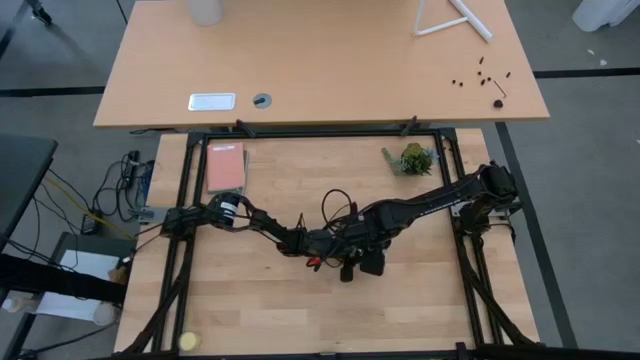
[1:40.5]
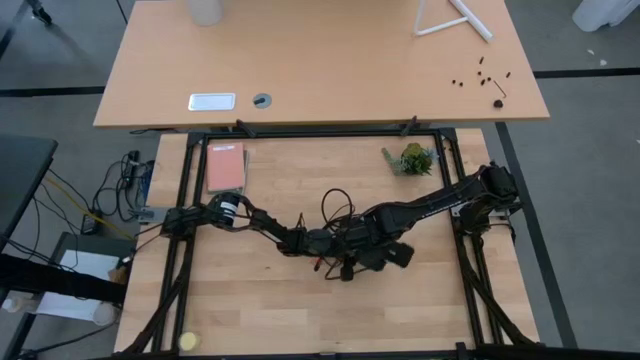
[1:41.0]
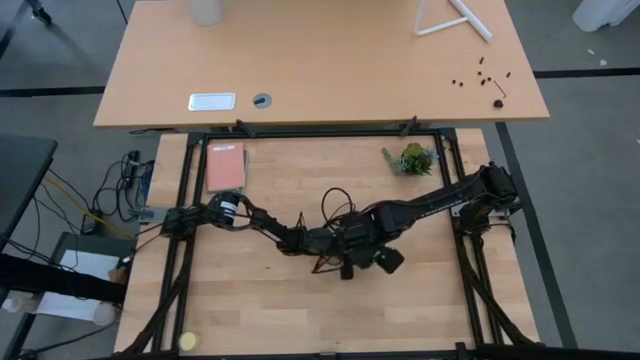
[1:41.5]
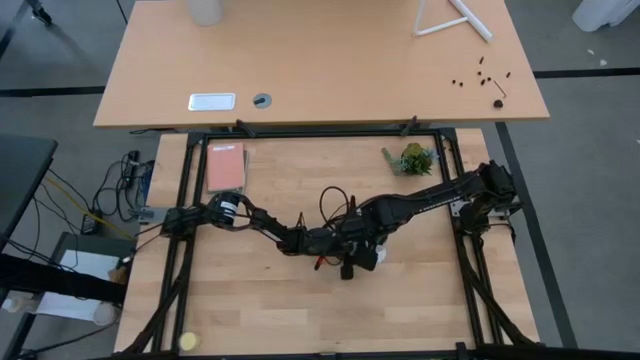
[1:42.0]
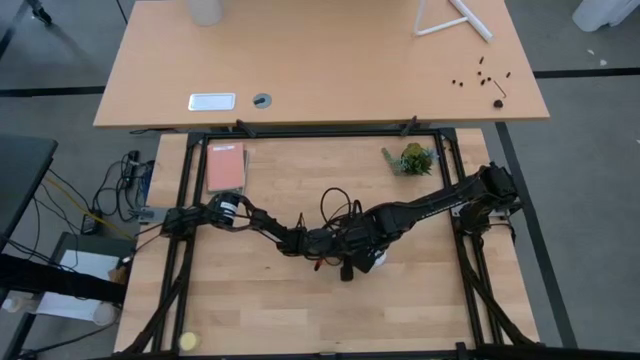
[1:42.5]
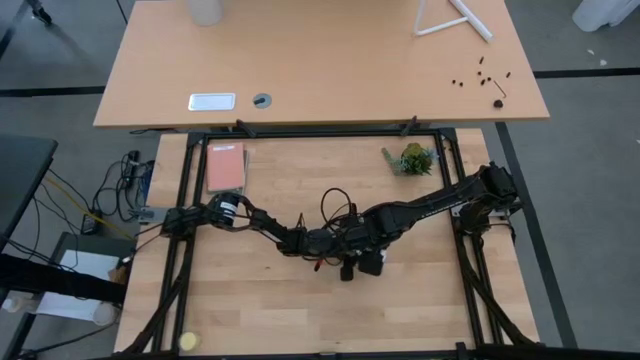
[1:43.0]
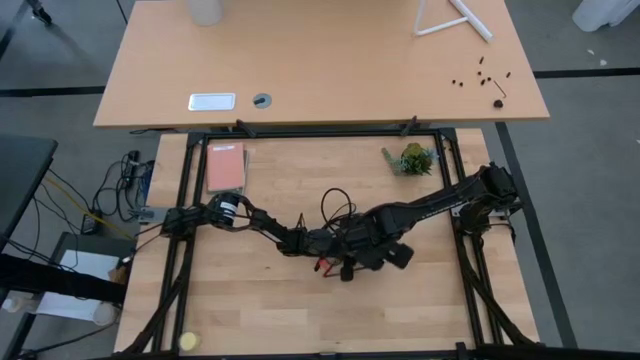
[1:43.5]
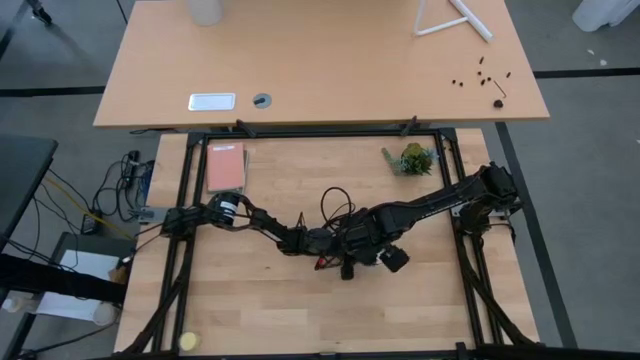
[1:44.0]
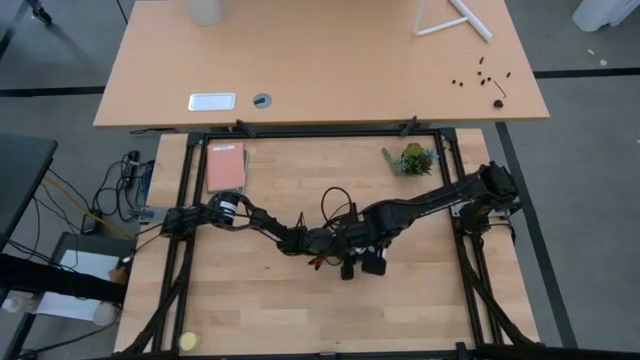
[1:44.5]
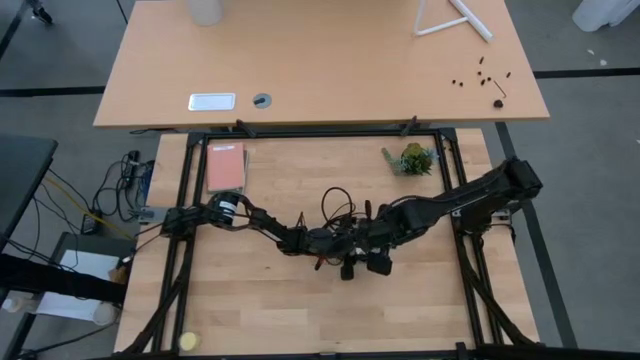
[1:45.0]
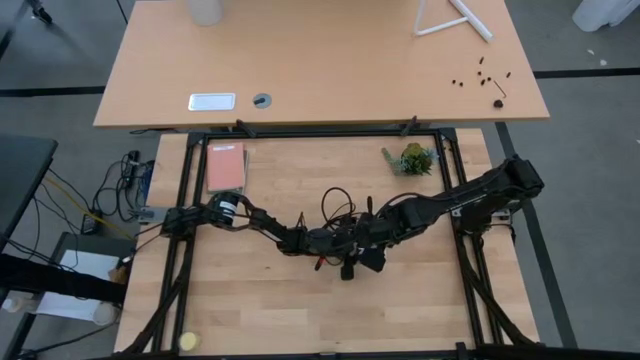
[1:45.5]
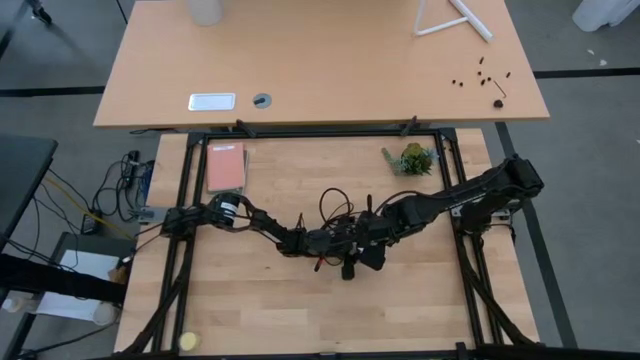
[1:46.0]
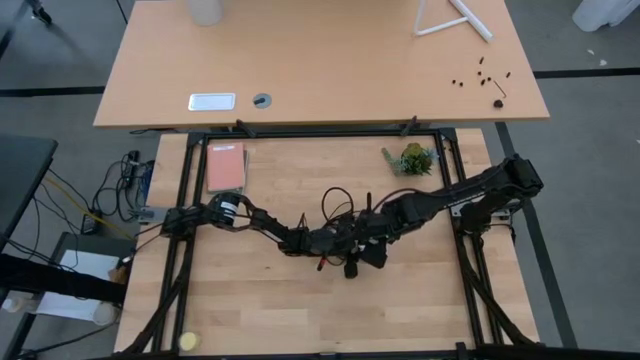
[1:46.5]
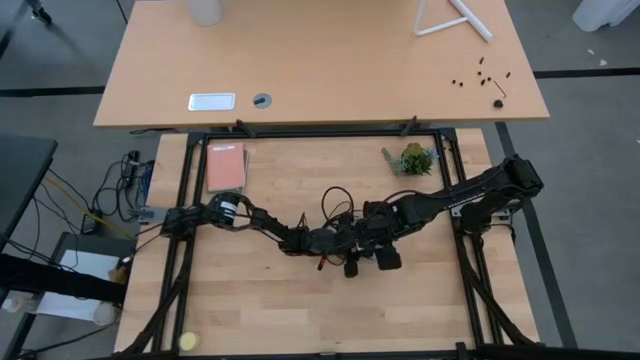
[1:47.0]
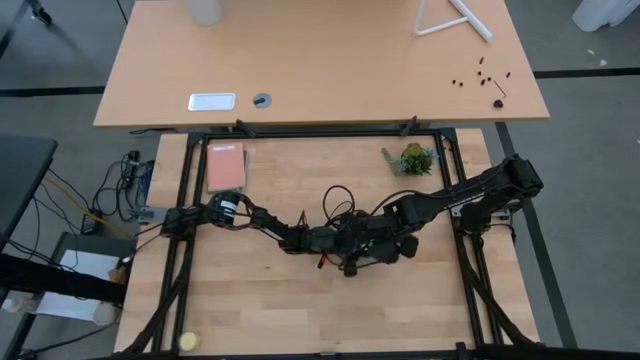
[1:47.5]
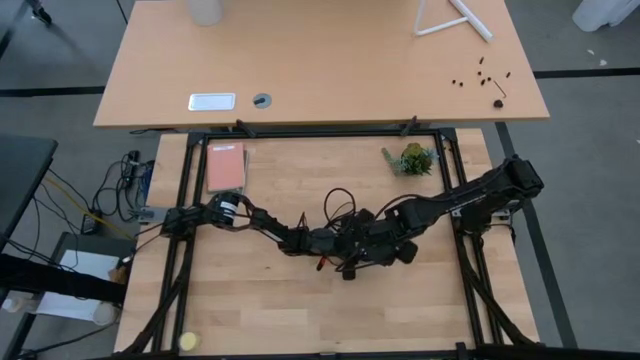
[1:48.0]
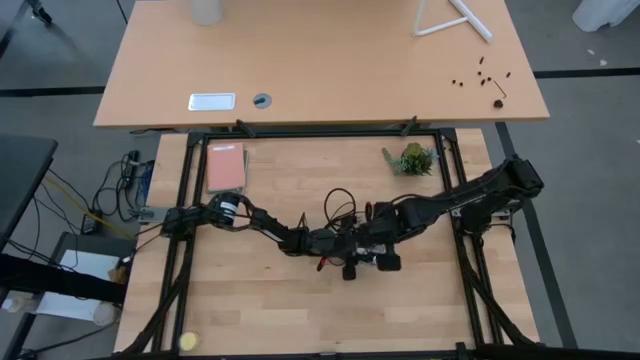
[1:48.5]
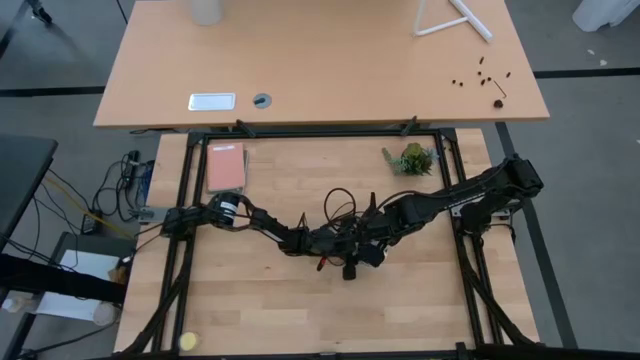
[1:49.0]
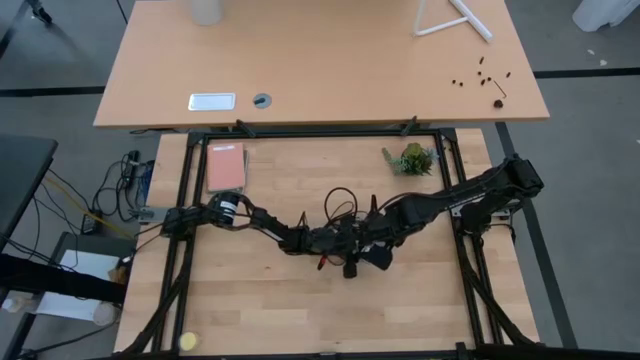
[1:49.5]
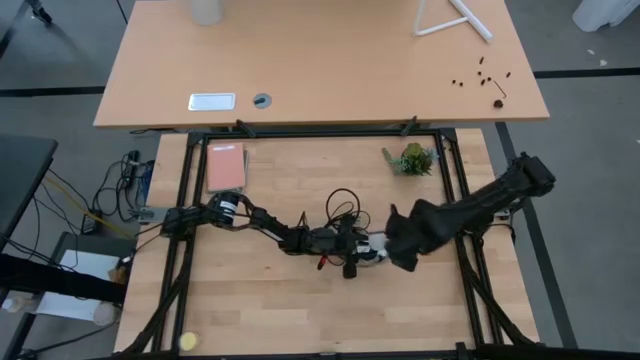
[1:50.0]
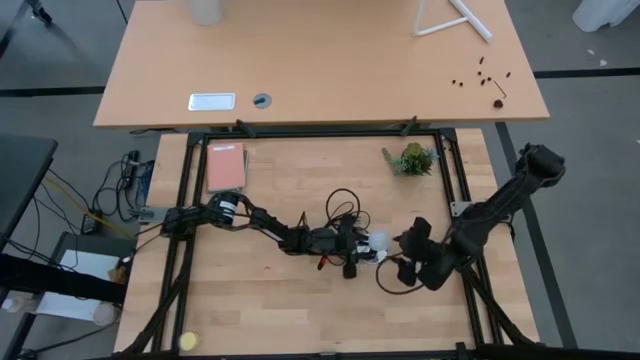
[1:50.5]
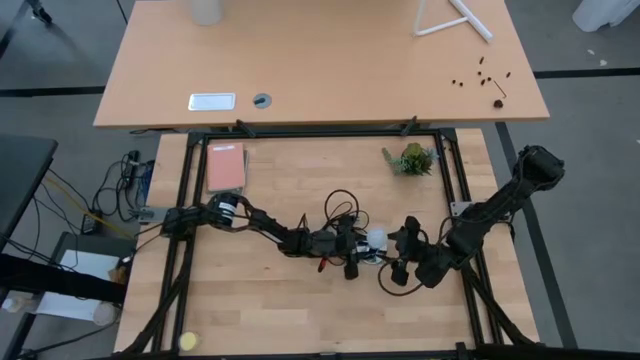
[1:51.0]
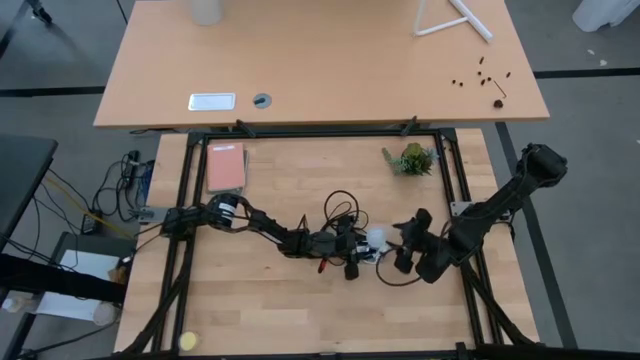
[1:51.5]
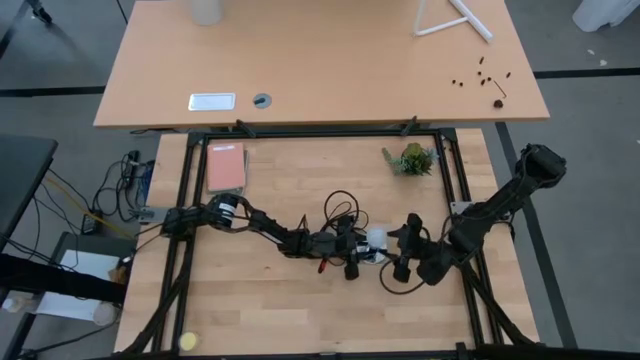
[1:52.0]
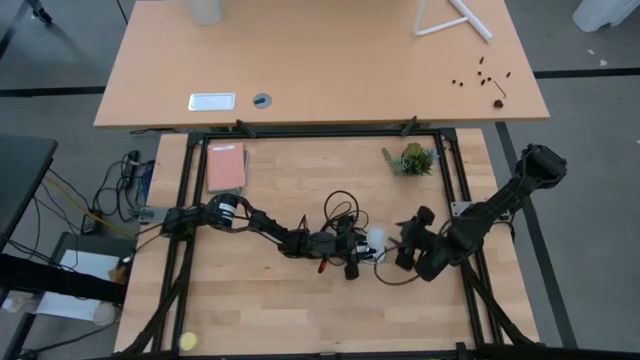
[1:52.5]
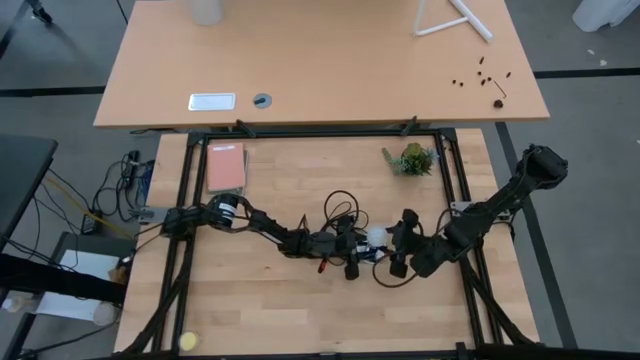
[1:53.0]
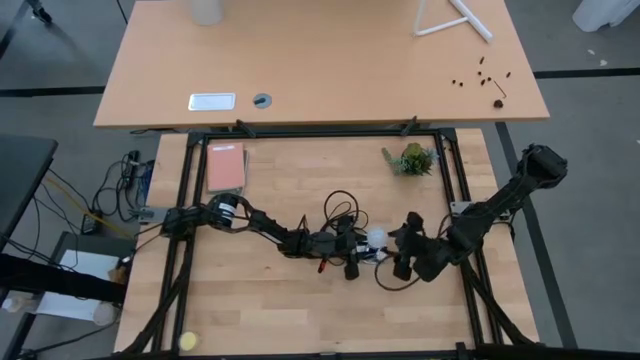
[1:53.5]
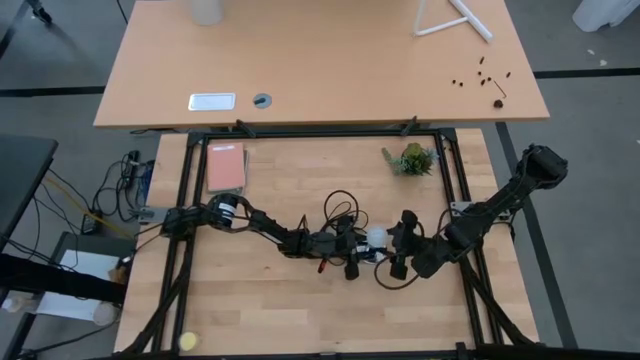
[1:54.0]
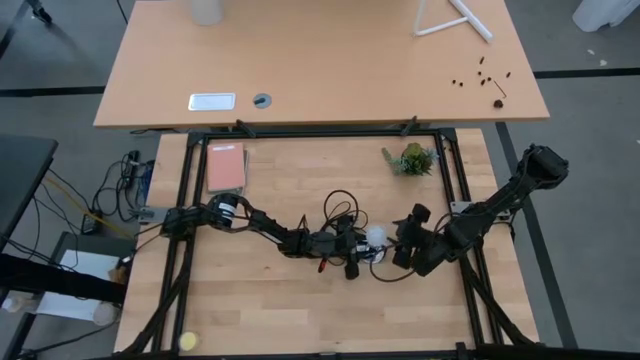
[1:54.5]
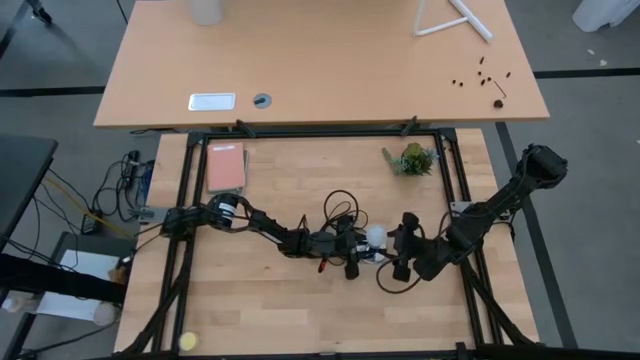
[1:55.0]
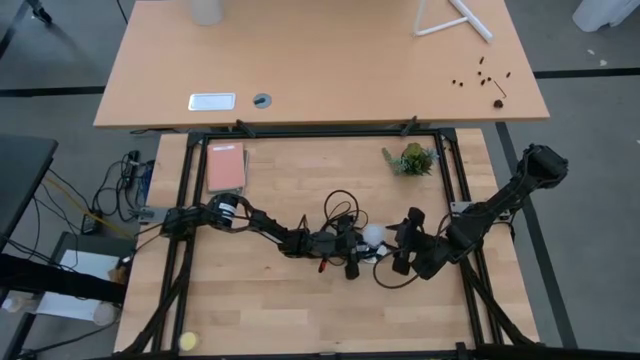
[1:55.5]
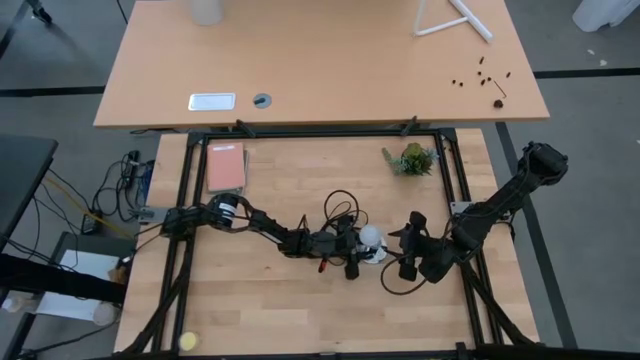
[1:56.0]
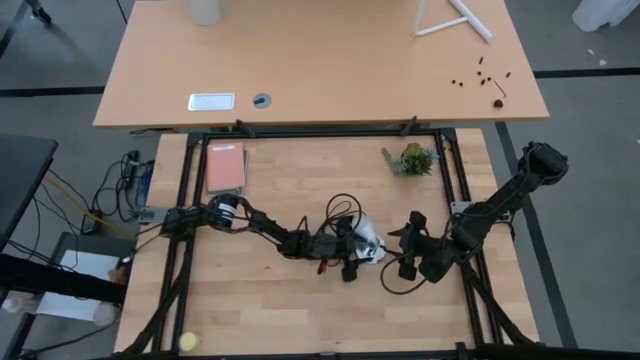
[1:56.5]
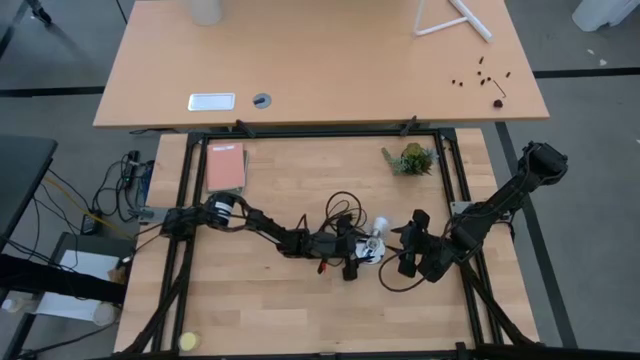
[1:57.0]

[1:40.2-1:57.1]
Task: Screw lightbulb
Remove the lightbulb from the lamp
